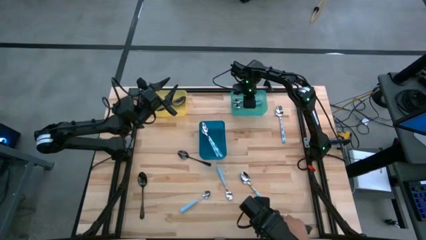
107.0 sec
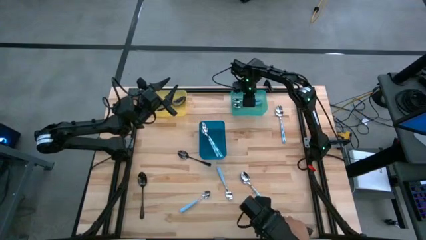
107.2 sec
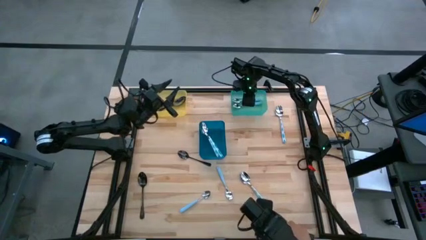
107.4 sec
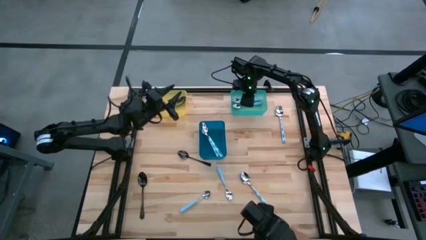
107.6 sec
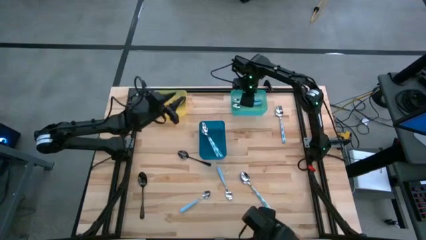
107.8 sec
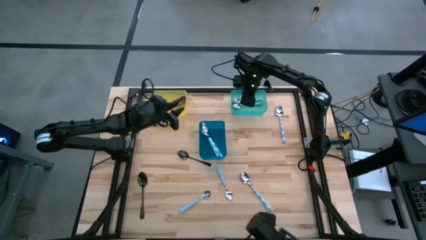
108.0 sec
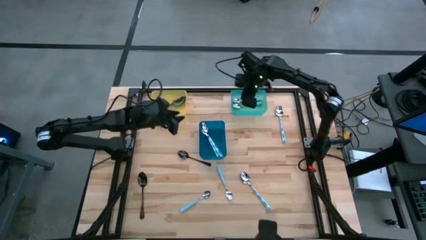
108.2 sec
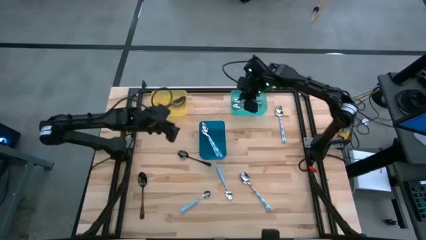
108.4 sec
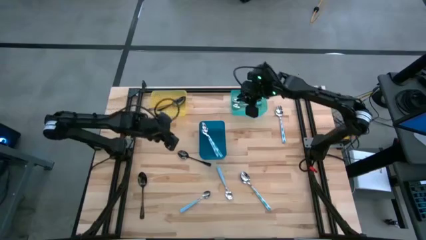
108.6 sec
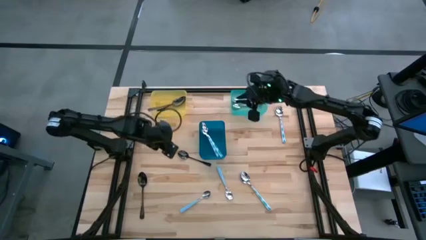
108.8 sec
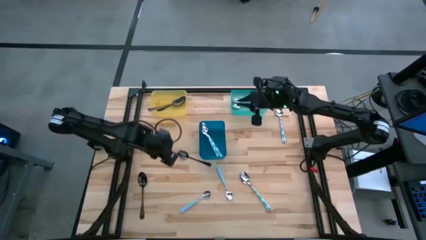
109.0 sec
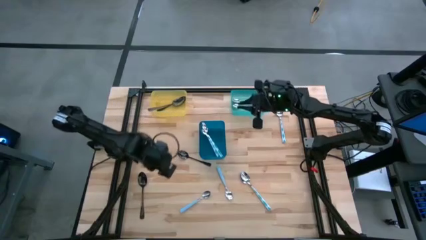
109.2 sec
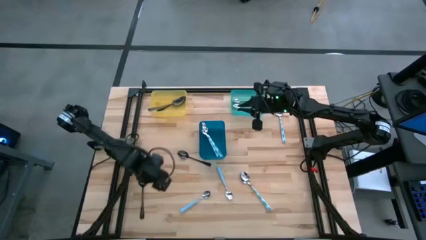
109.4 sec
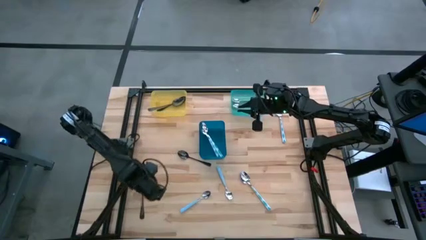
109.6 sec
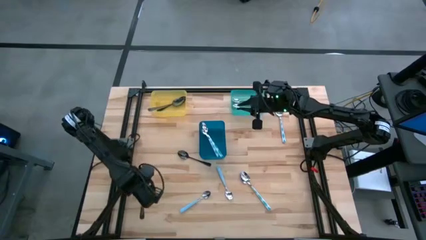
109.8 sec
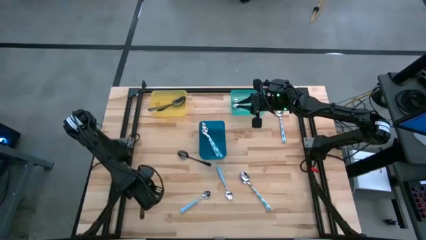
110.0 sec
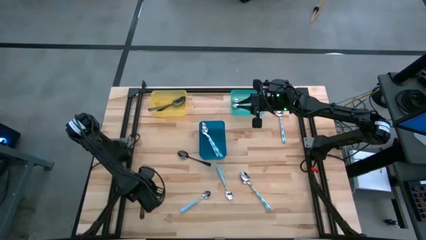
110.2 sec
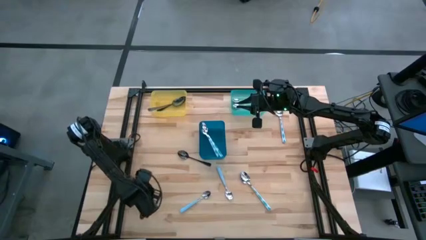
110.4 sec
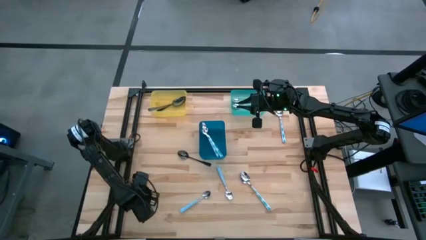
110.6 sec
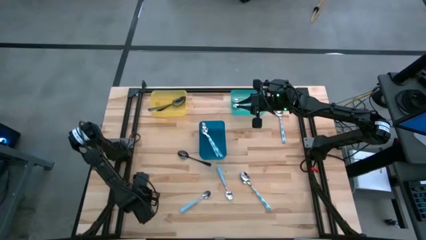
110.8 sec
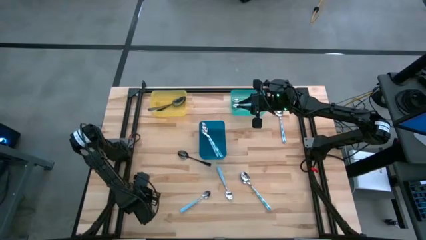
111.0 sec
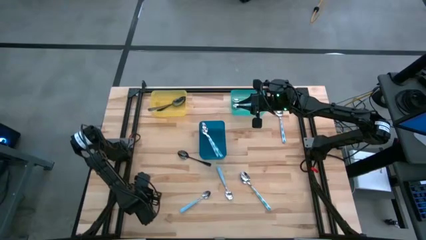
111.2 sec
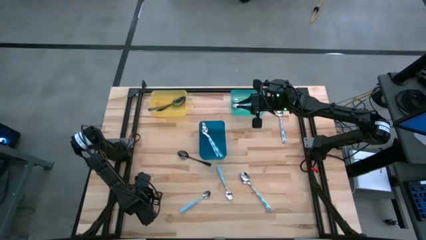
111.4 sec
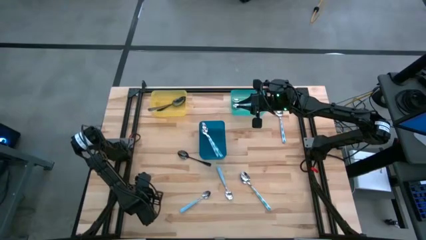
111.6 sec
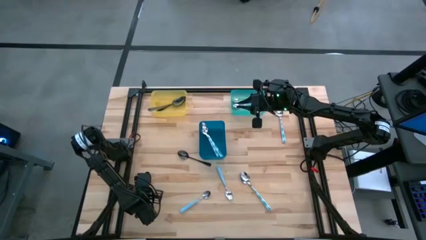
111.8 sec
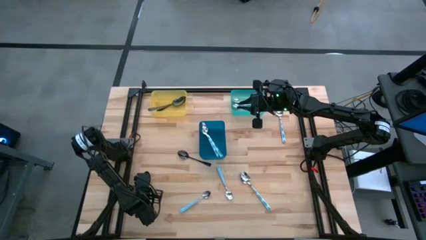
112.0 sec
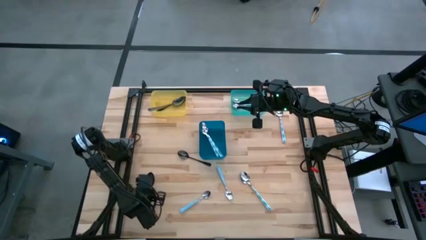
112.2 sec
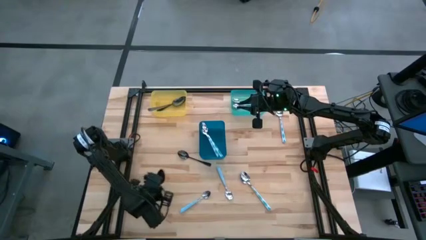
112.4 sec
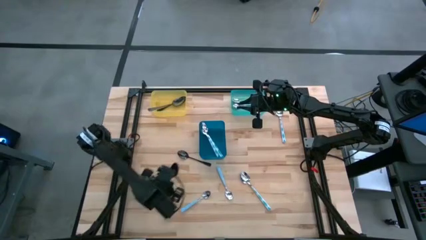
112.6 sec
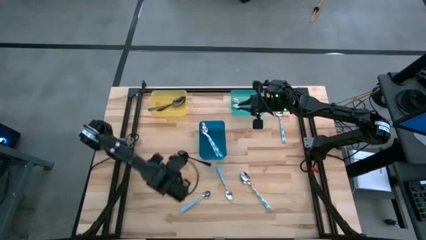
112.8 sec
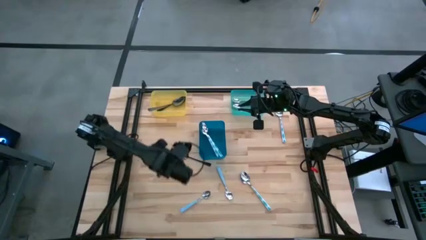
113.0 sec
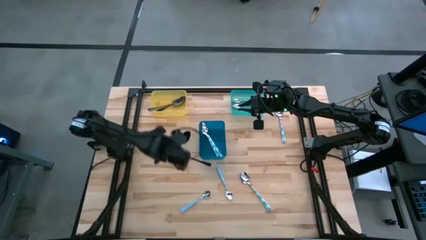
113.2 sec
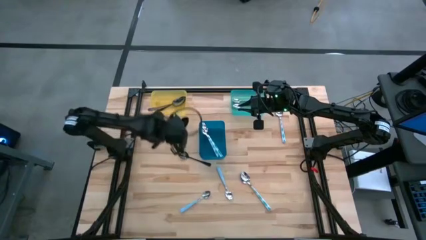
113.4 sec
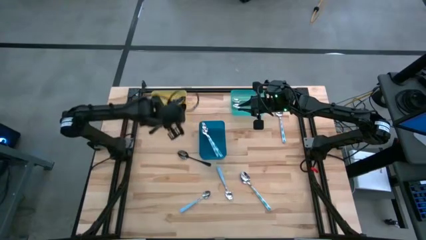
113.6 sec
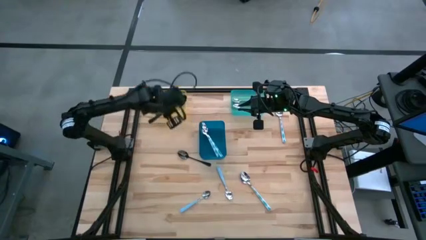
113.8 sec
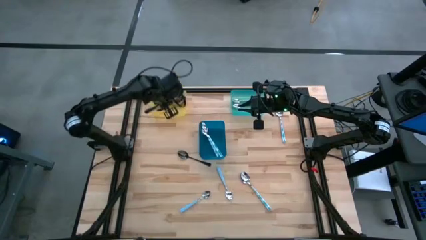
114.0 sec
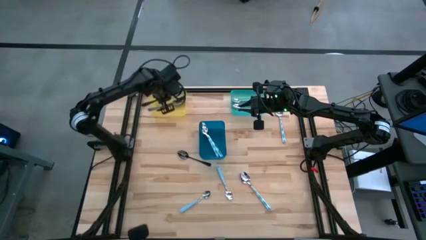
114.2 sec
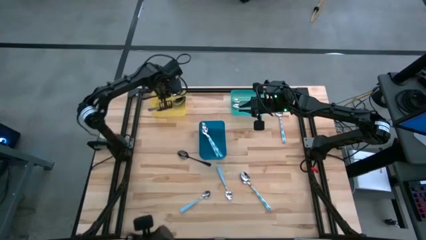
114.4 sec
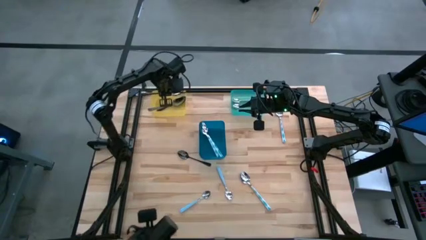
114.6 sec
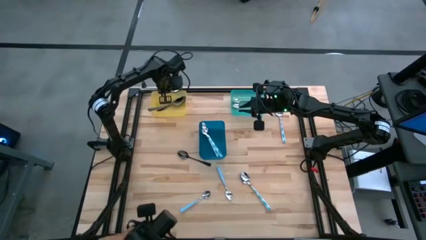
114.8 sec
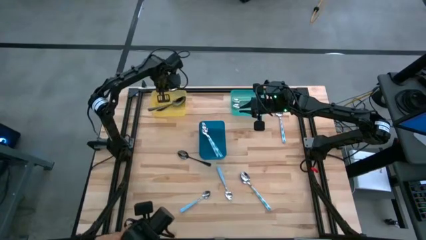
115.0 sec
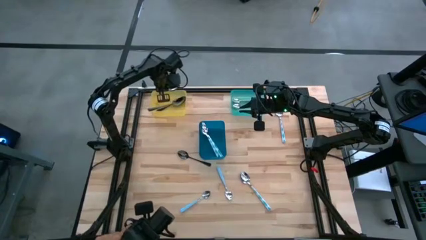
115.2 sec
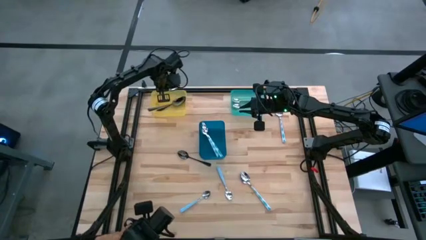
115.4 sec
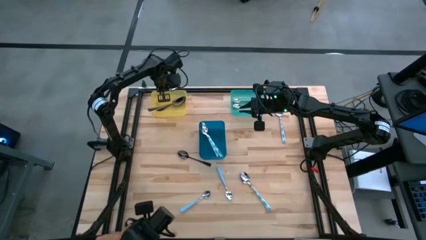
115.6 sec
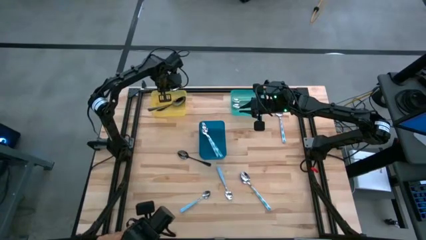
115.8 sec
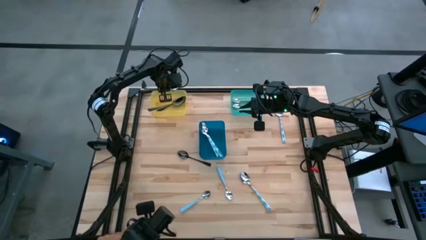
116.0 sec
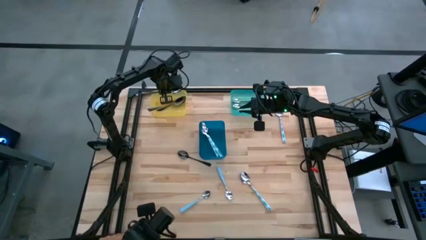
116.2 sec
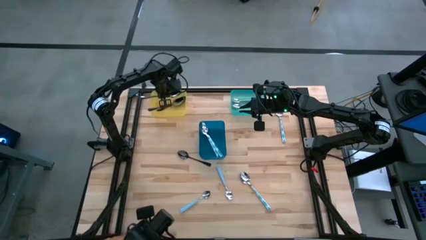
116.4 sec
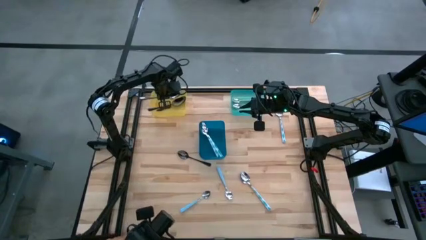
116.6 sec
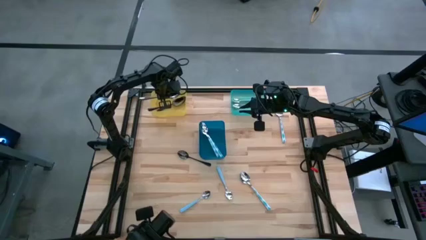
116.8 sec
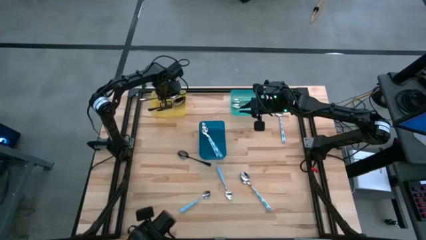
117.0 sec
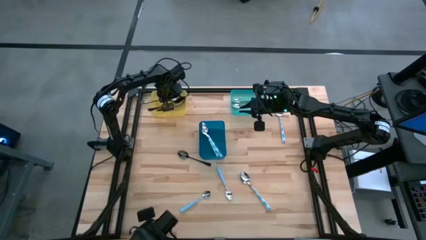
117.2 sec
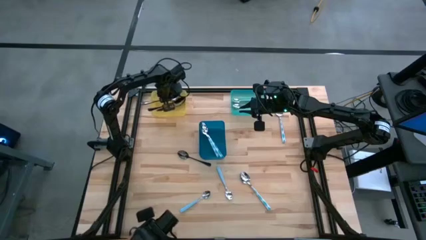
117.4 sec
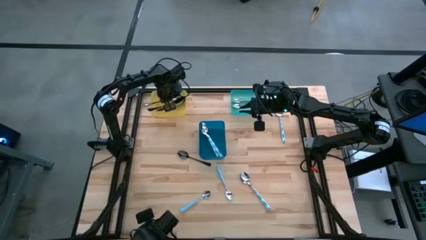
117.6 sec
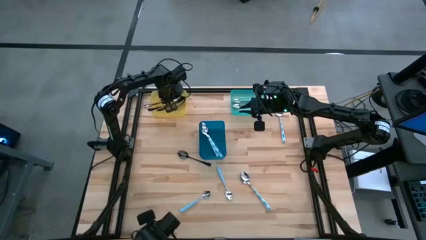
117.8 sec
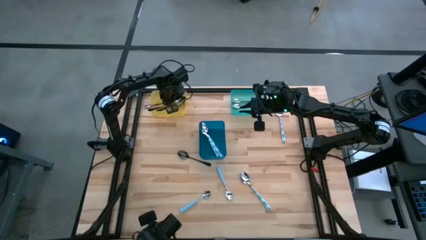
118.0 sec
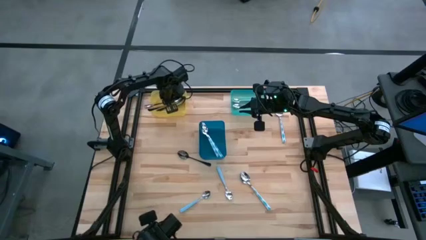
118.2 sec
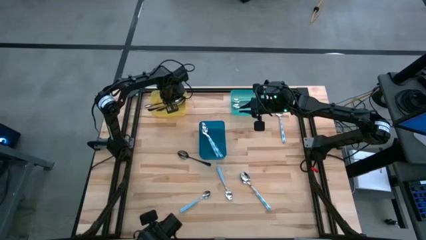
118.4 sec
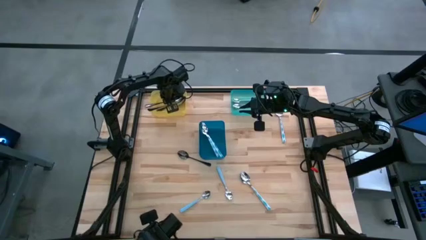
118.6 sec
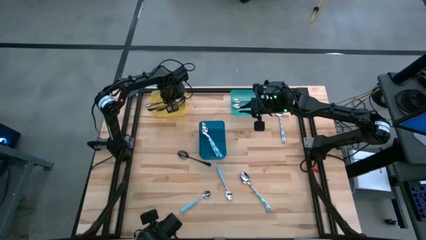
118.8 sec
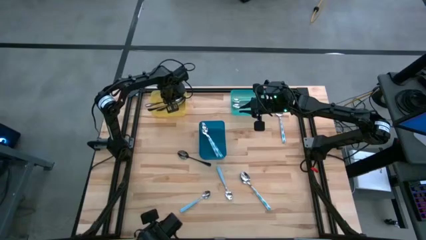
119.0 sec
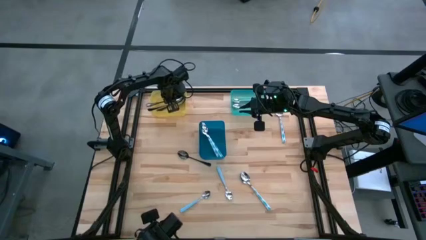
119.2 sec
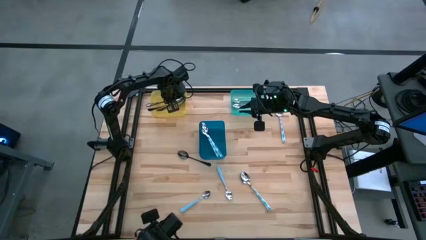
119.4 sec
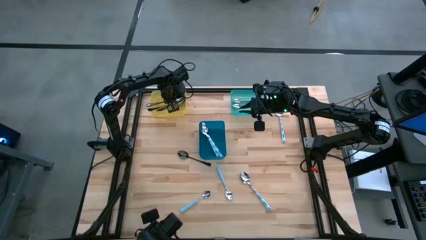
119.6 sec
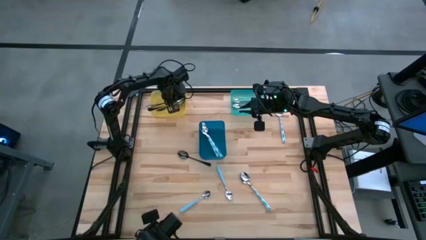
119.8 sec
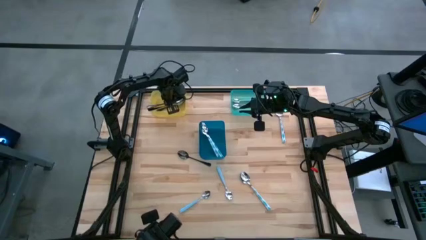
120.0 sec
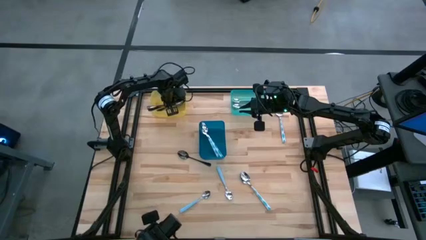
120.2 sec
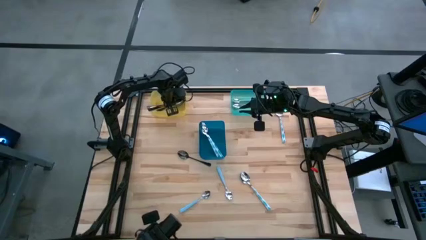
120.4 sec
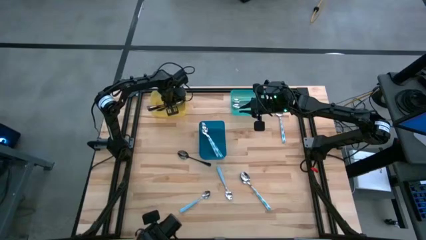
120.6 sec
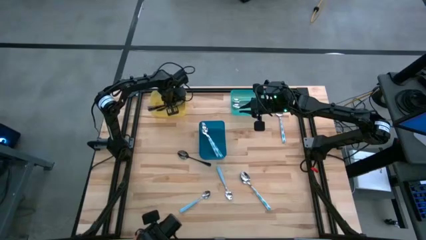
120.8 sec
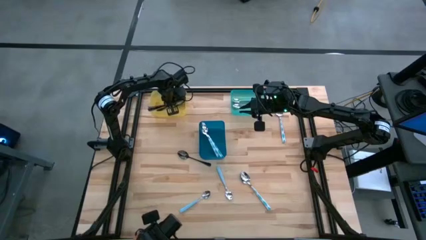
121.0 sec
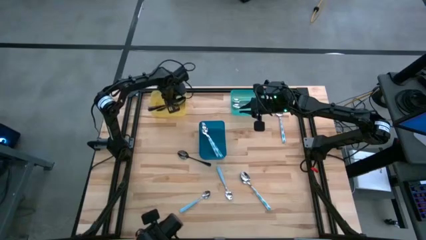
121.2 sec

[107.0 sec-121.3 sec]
Task: Sort silverware by color (type)
Put the black spoon into the yellow bin
